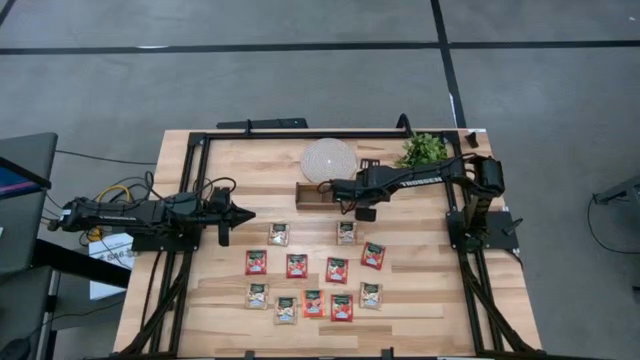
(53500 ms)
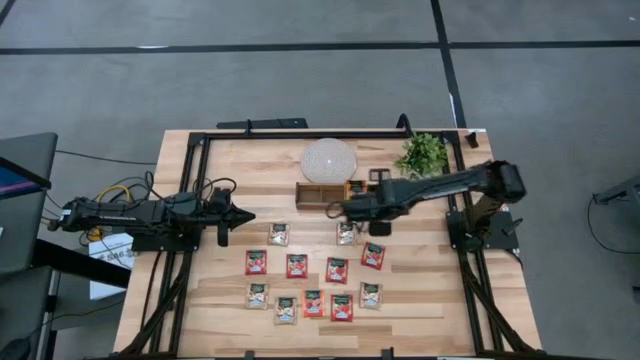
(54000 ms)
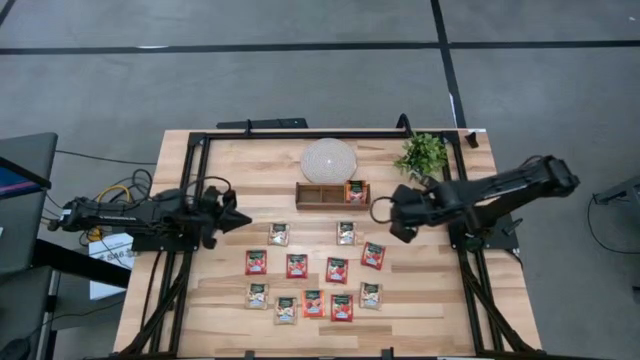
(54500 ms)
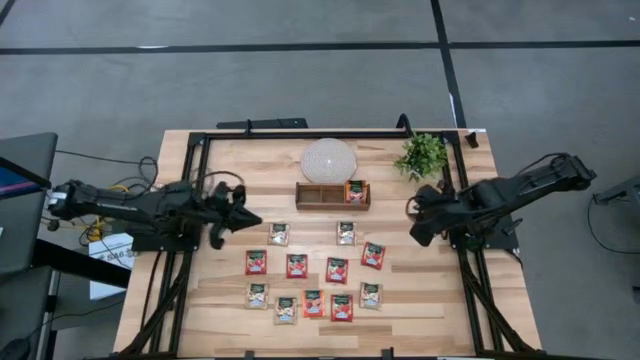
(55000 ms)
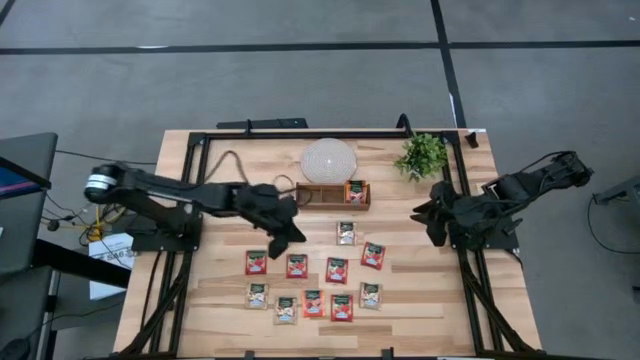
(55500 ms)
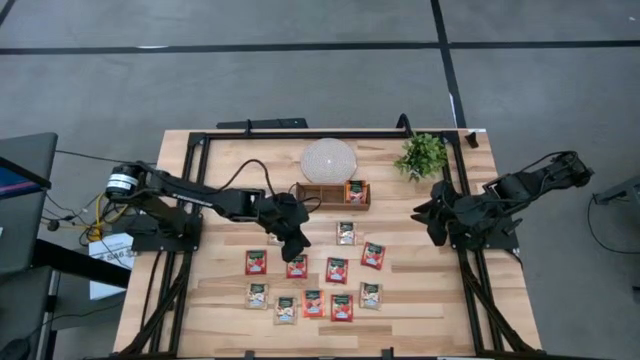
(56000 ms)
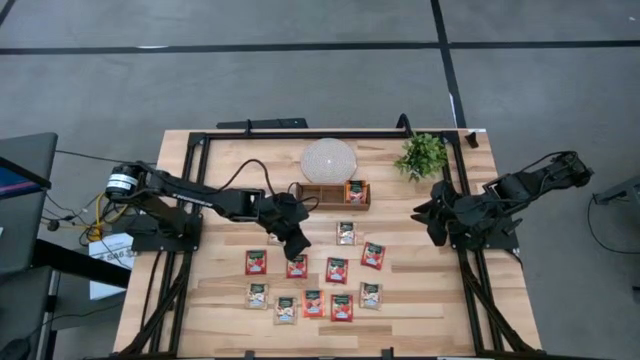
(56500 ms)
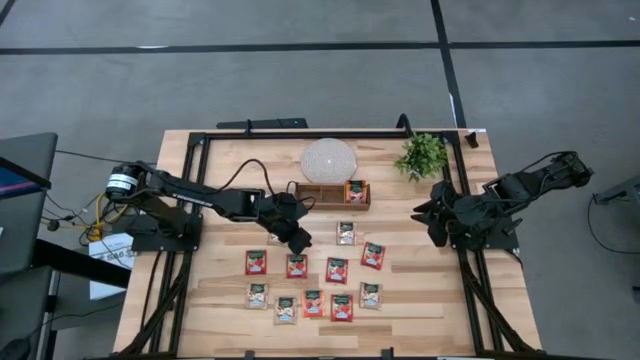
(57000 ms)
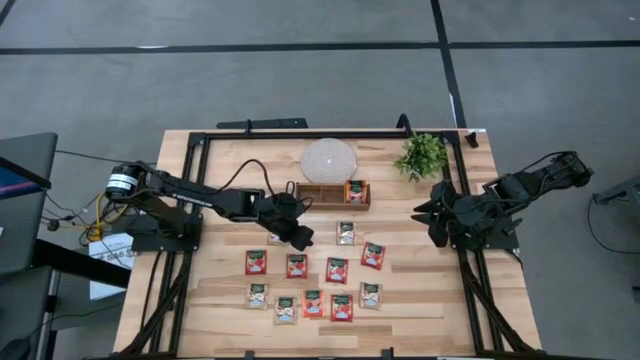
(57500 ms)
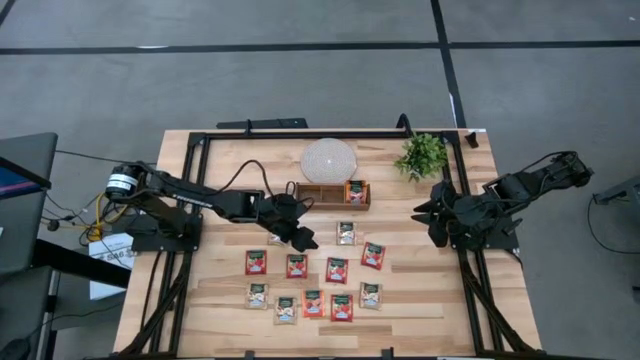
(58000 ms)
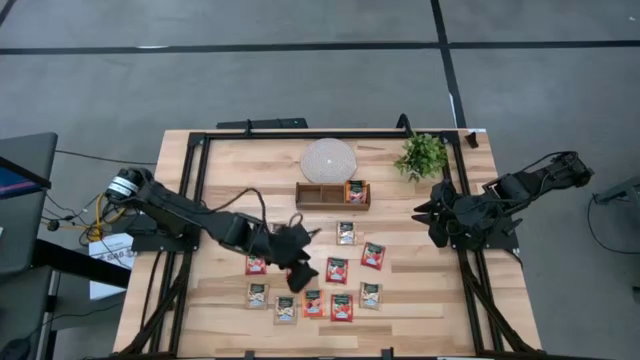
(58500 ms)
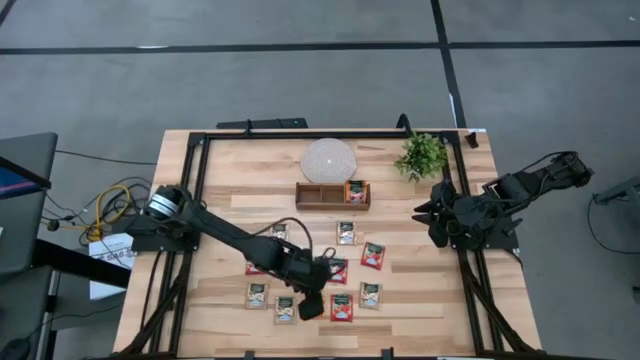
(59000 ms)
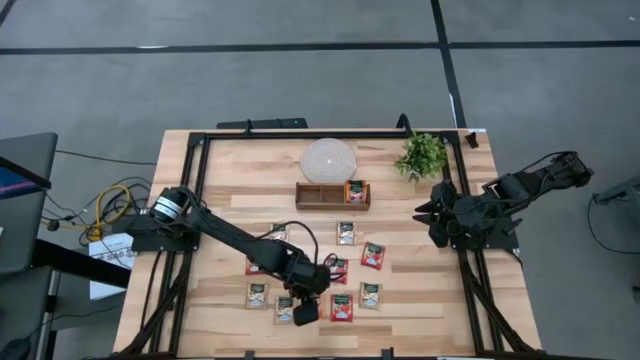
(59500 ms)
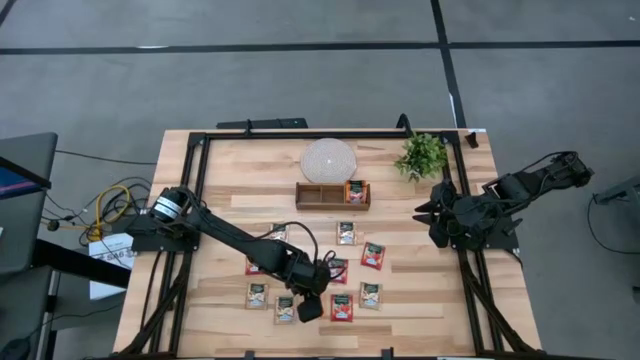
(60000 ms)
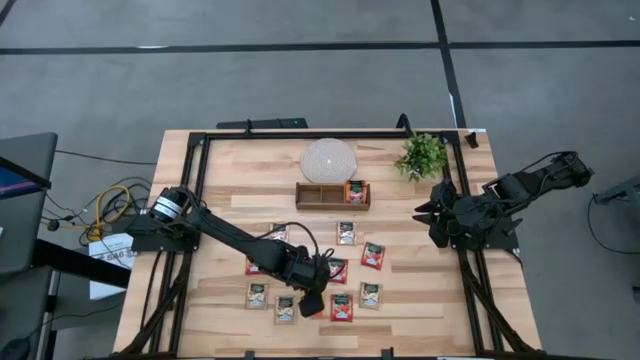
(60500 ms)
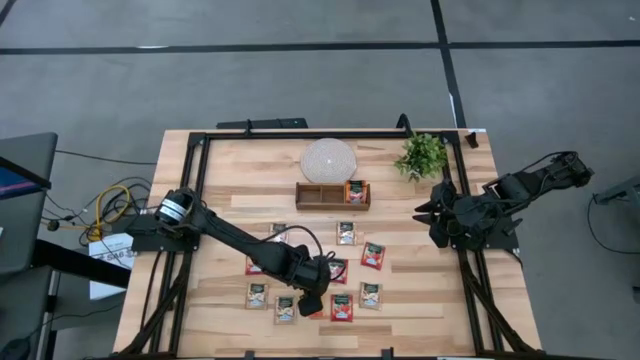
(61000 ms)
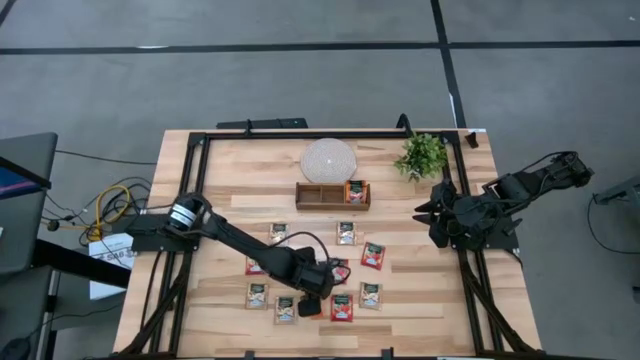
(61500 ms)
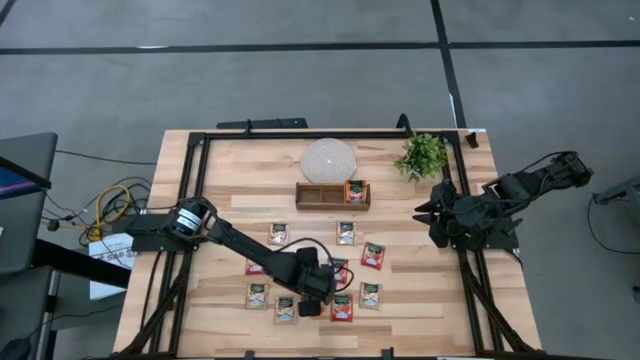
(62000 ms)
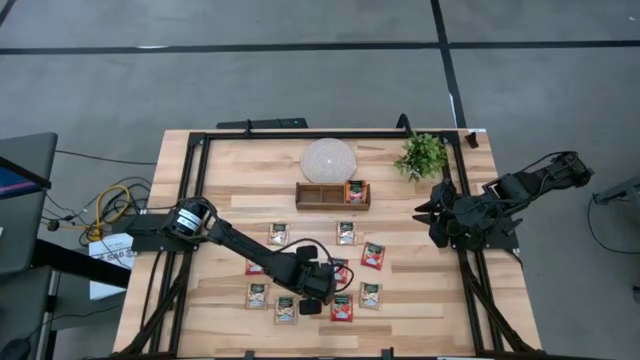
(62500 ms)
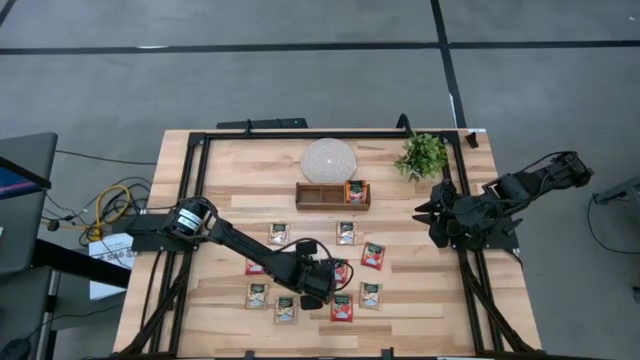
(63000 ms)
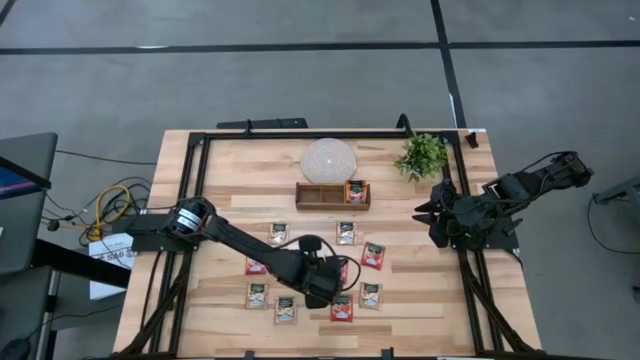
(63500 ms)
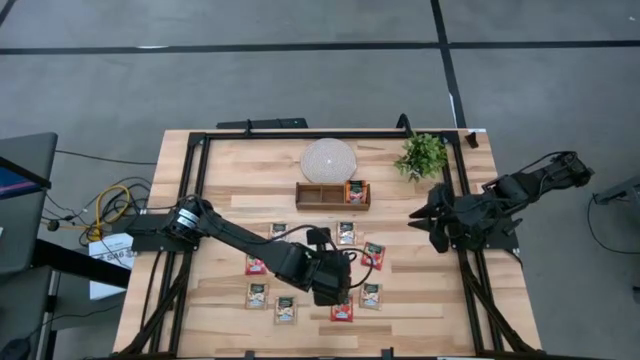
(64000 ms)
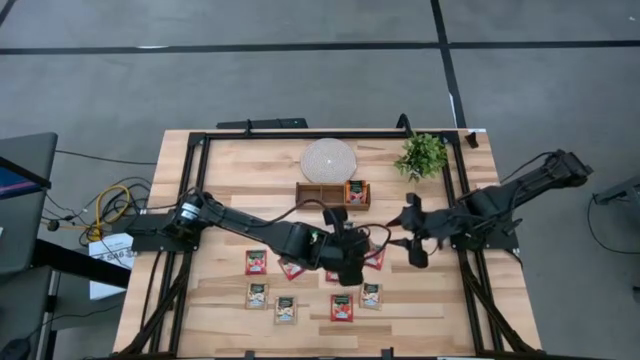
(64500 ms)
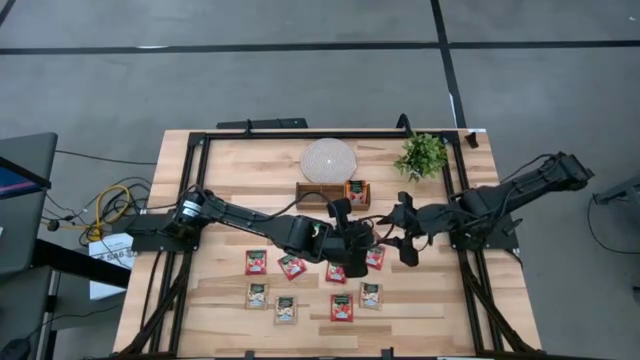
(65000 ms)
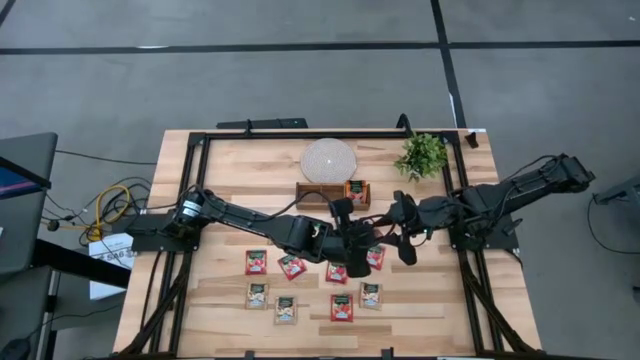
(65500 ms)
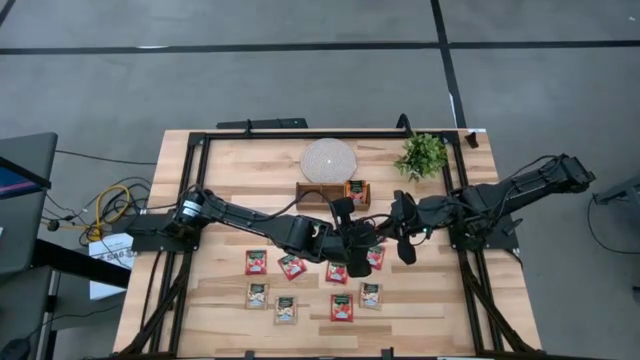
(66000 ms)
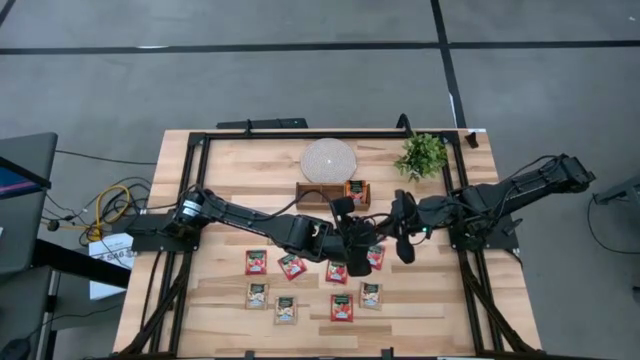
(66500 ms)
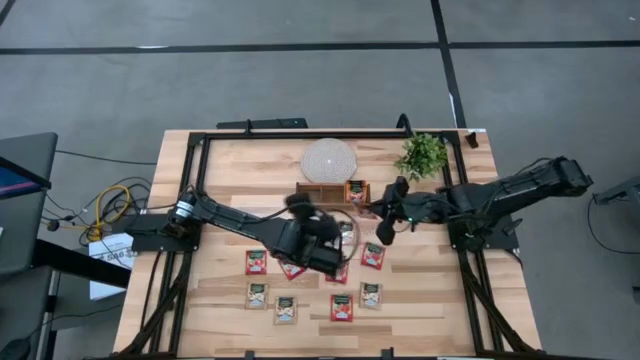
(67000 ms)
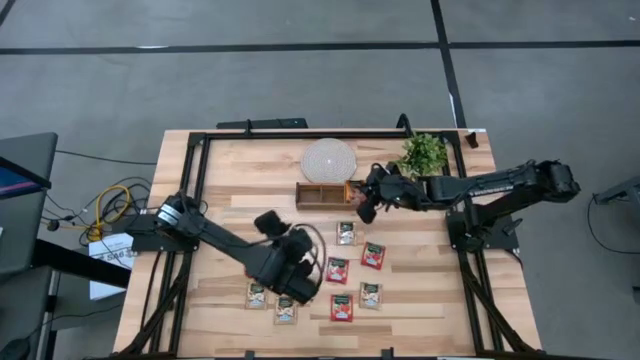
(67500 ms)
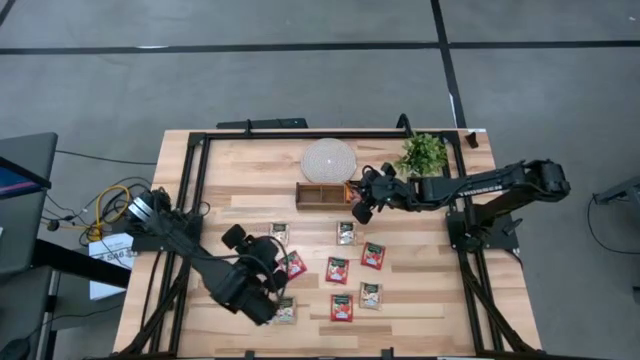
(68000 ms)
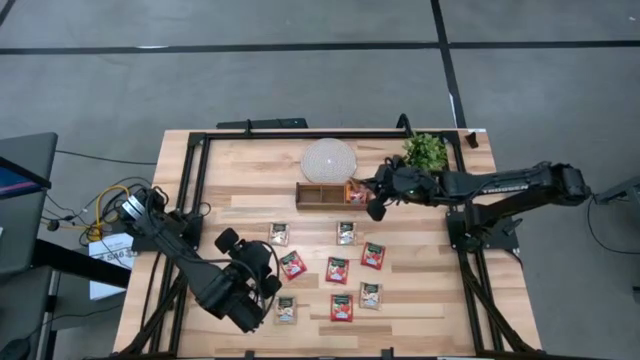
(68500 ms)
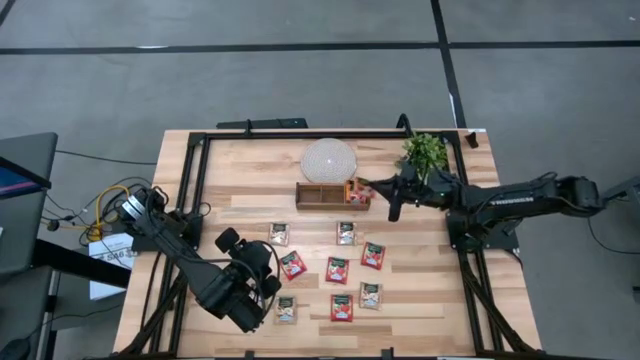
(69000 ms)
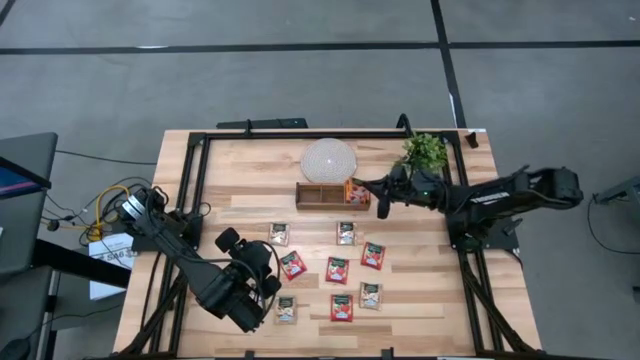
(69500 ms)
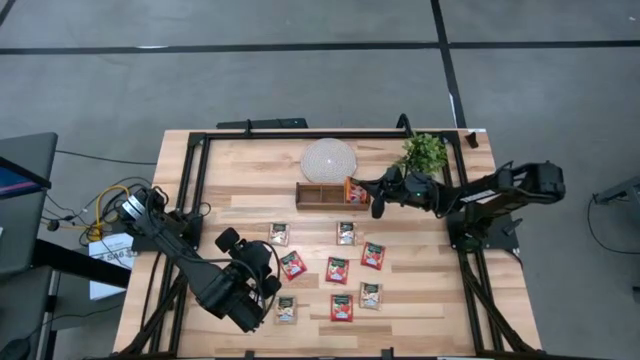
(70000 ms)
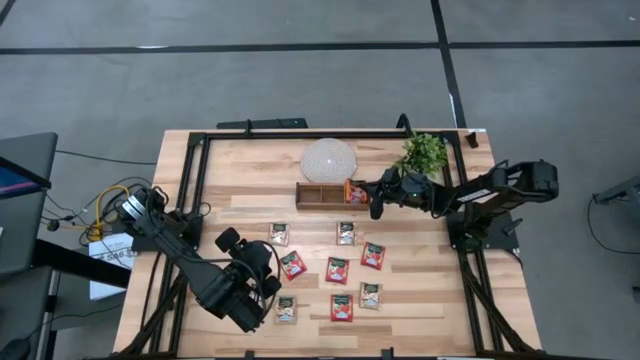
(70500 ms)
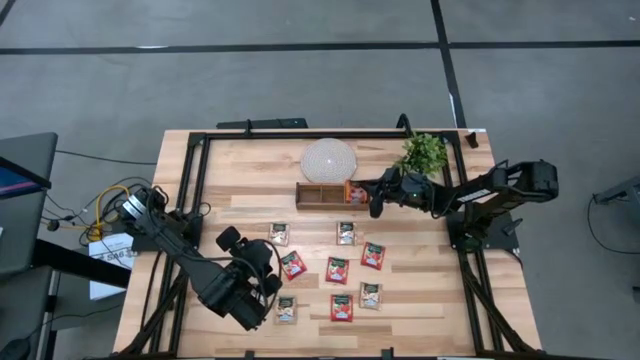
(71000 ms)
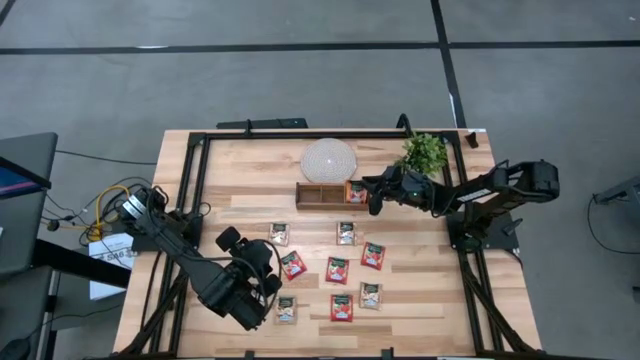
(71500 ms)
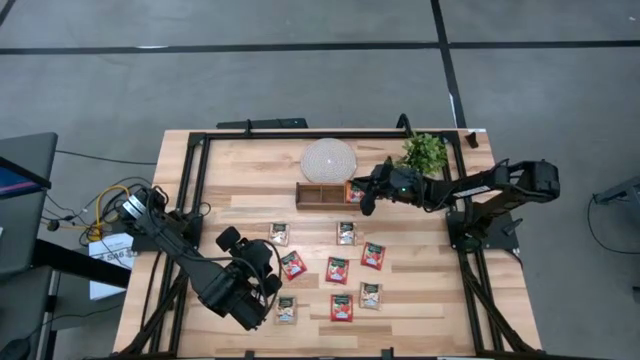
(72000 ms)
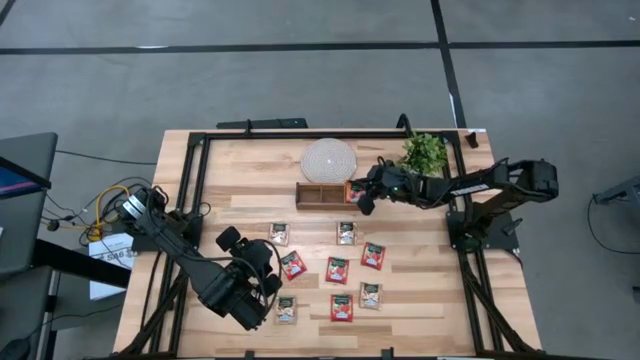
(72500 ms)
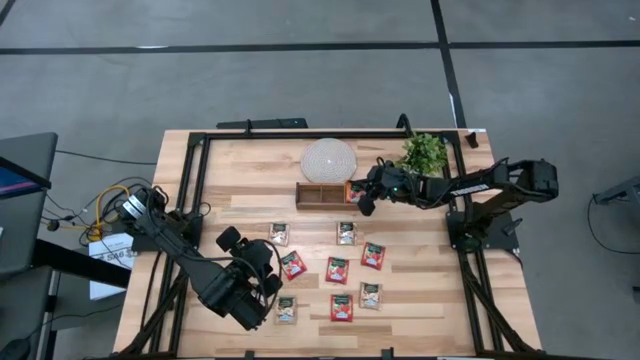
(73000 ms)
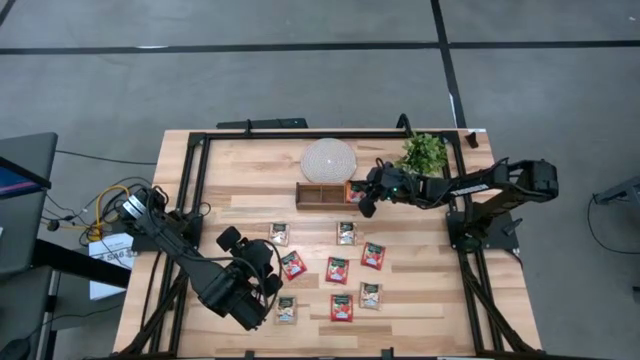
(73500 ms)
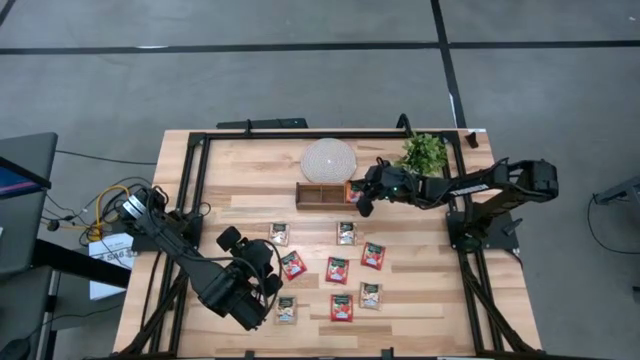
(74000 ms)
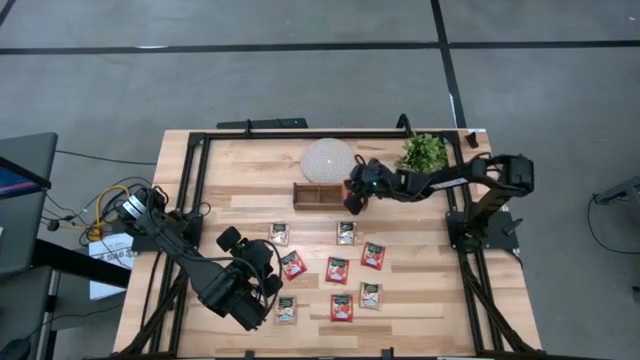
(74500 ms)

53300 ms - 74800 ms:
Task: Pick & Place Tea
Put the orange tea bag into the right compartment of the wooden organizer

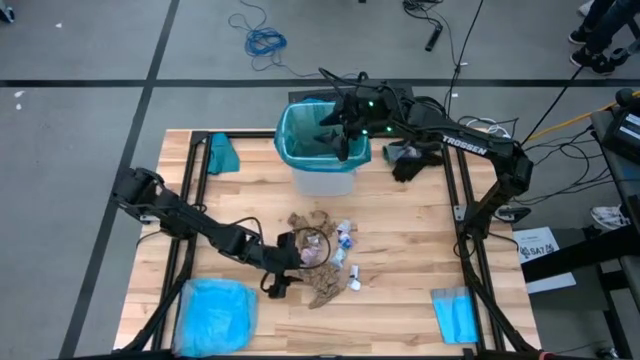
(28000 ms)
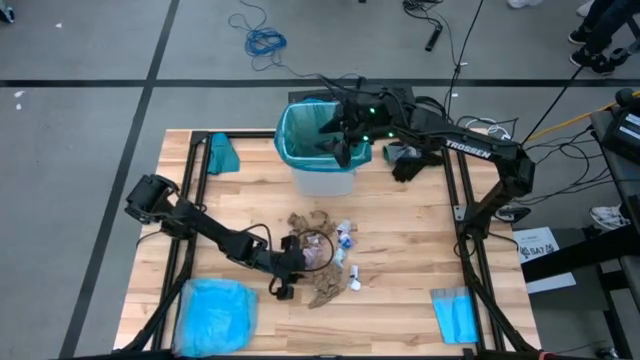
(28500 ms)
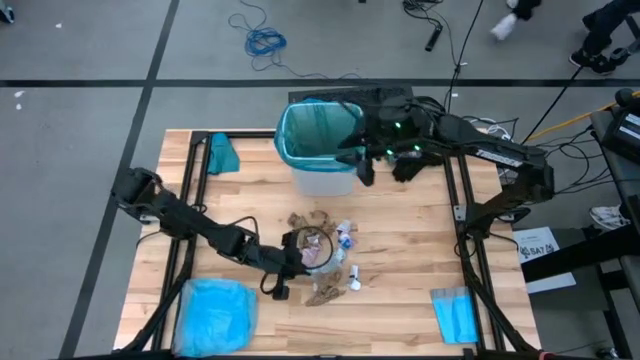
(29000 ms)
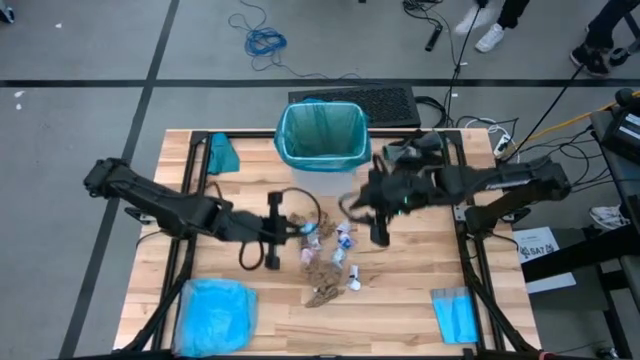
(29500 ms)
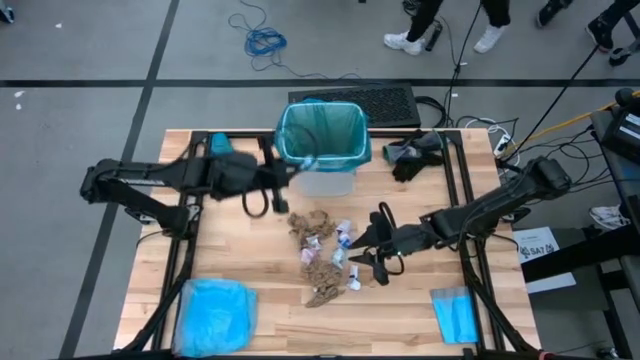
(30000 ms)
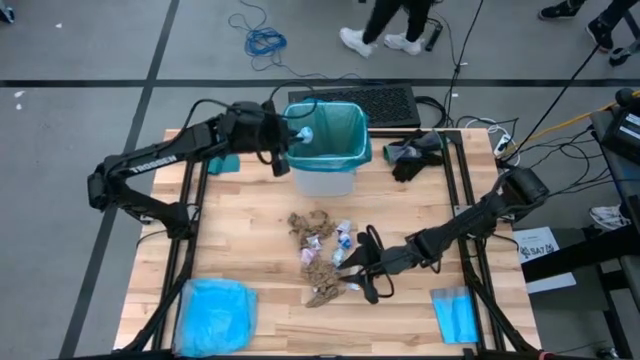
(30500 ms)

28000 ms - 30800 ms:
Task: place trash/remove bag and relplace
Put the blue trash bag into the trash bin
